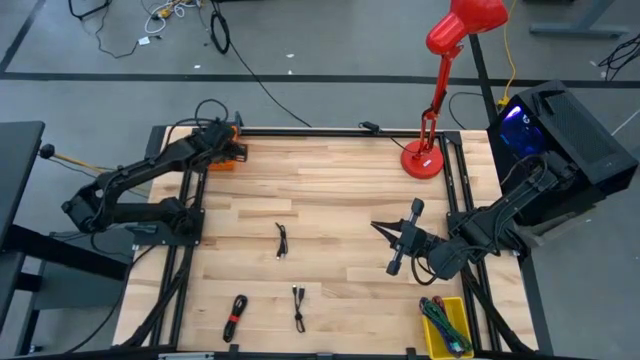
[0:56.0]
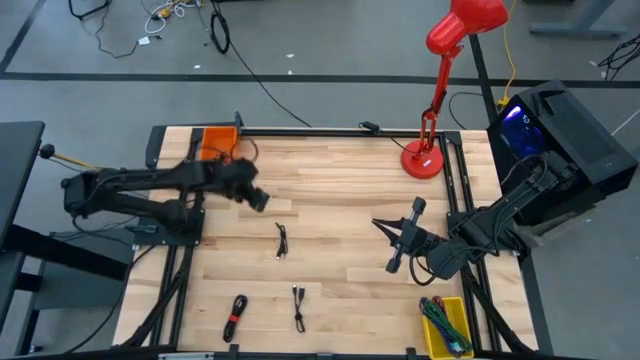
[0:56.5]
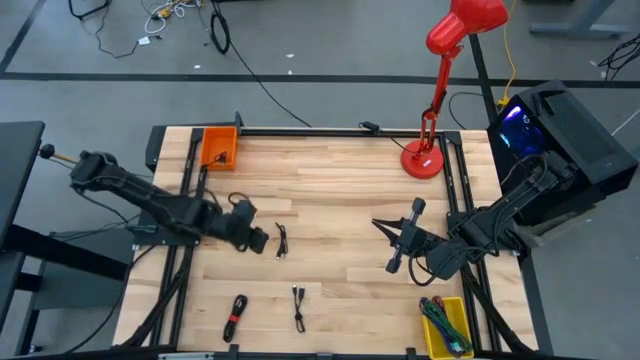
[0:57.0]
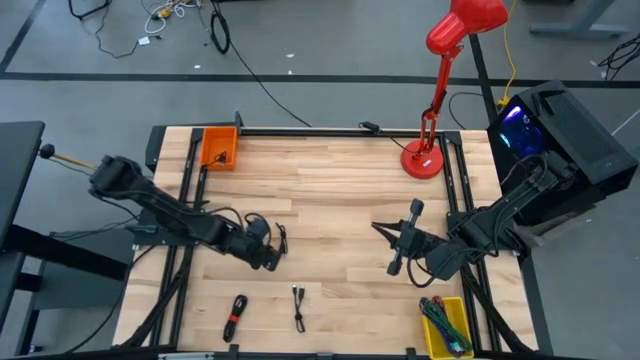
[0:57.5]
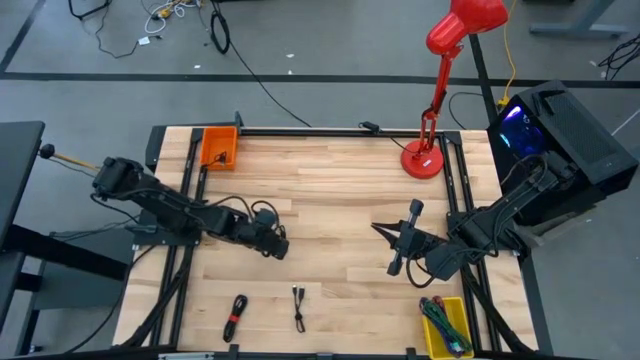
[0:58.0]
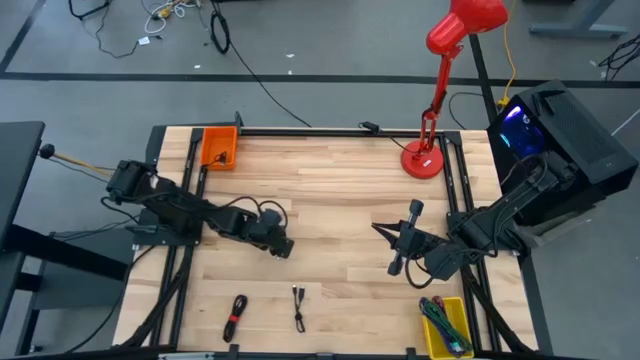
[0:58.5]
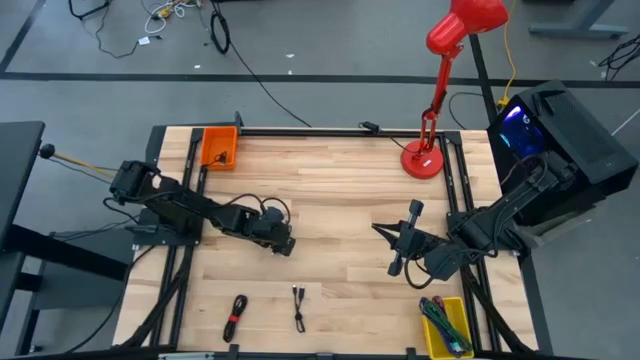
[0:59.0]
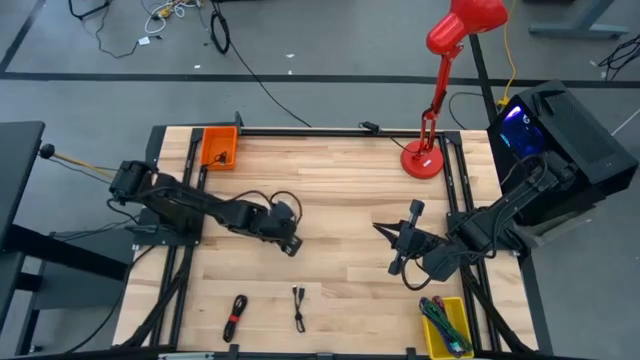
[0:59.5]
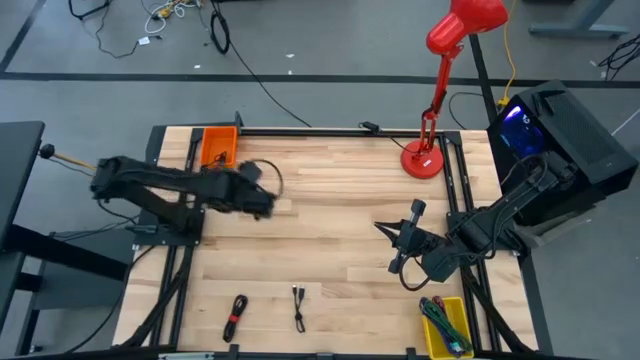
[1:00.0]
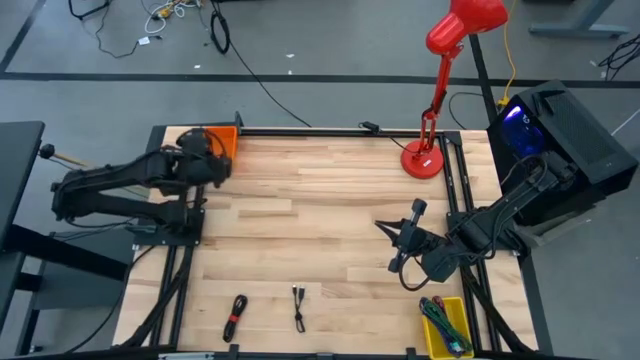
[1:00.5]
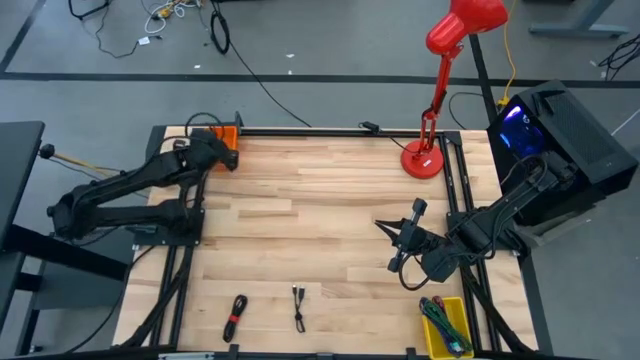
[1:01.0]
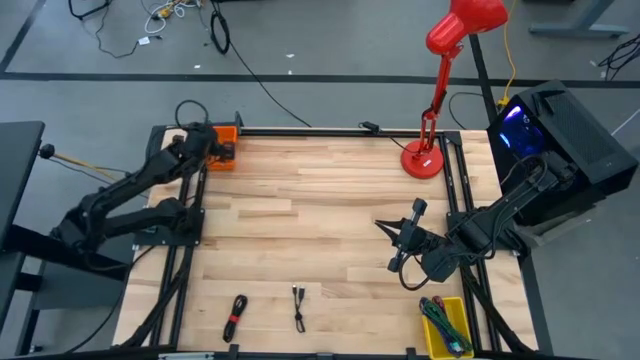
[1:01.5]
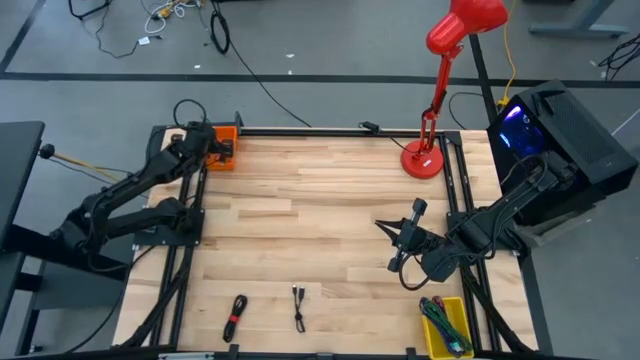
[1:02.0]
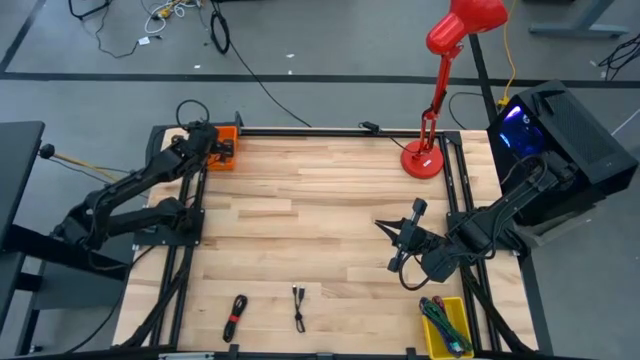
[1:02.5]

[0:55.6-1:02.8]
Task: Pick & Place USB Port
Put the top black charger cable into the orange bin

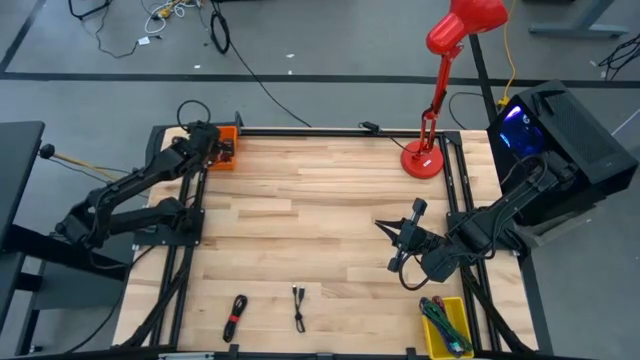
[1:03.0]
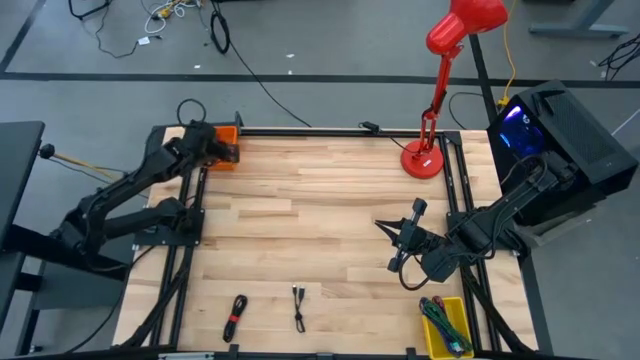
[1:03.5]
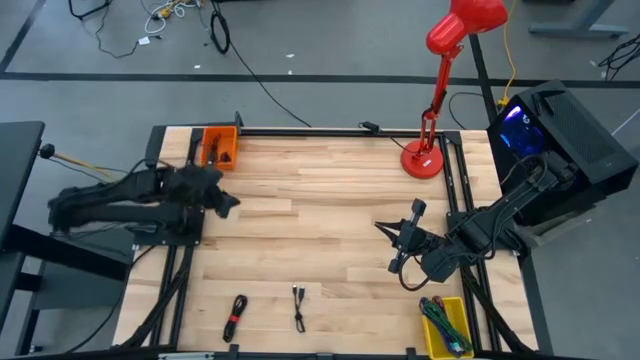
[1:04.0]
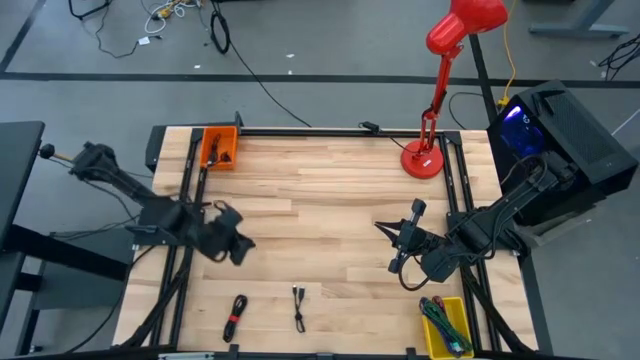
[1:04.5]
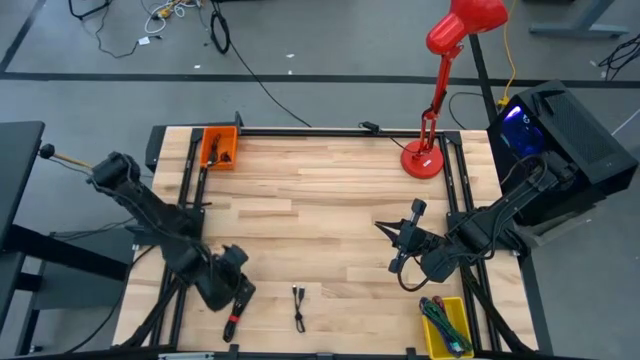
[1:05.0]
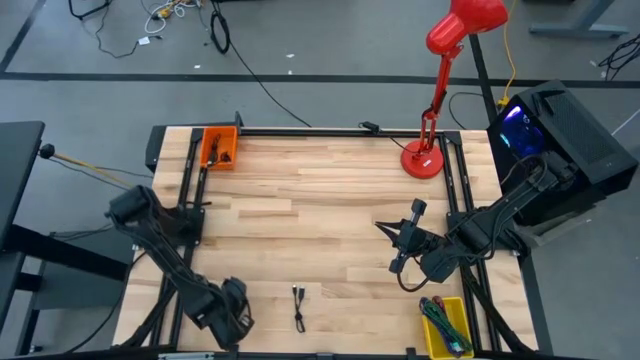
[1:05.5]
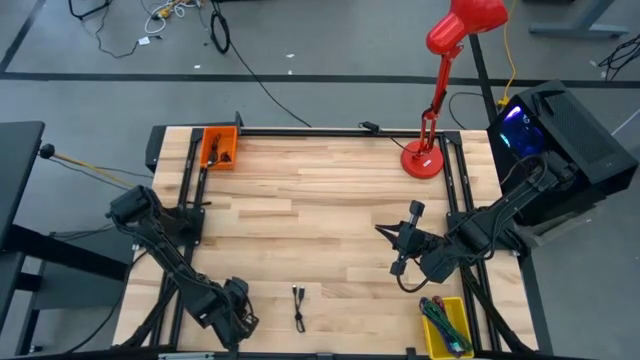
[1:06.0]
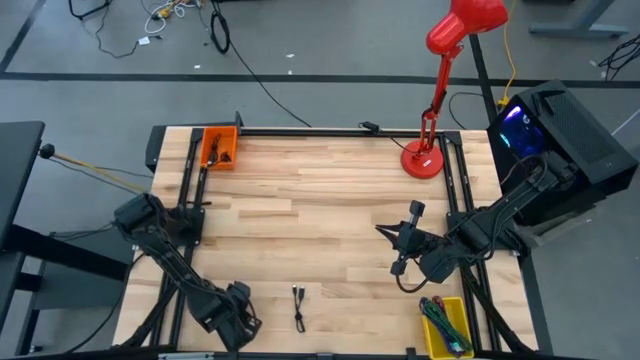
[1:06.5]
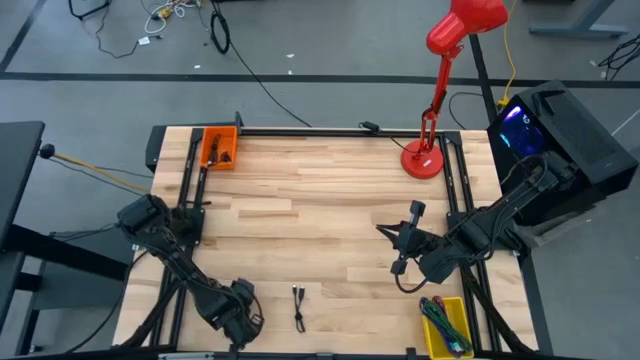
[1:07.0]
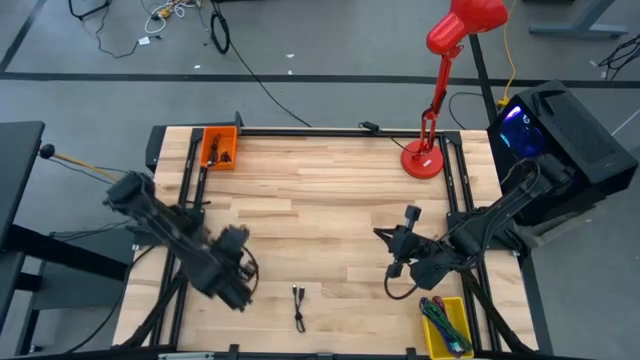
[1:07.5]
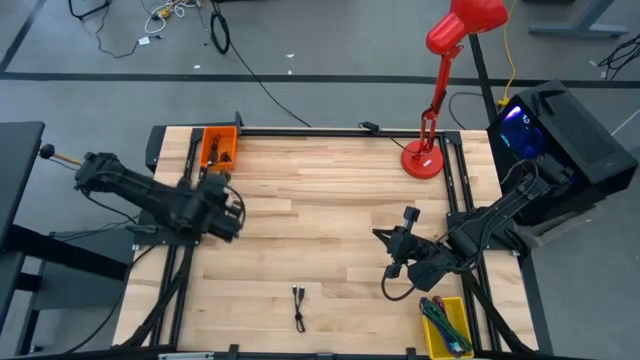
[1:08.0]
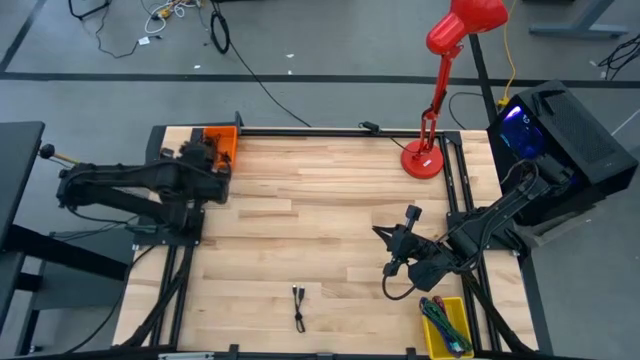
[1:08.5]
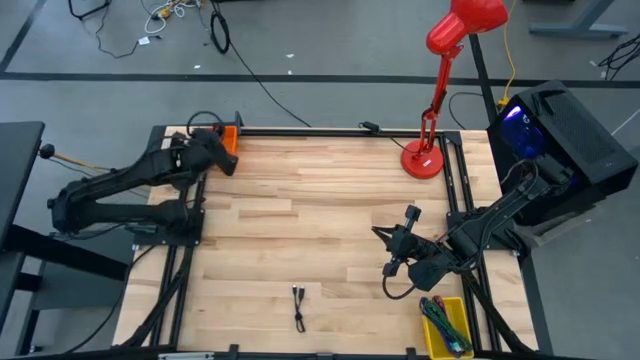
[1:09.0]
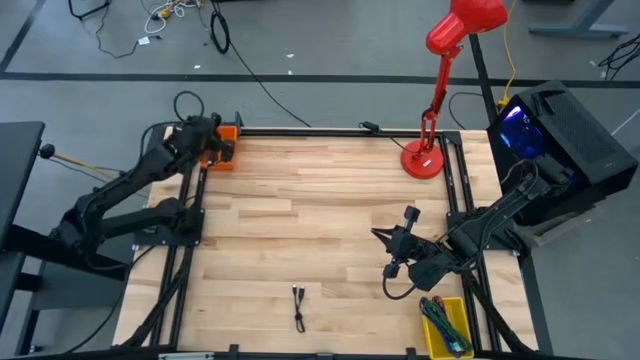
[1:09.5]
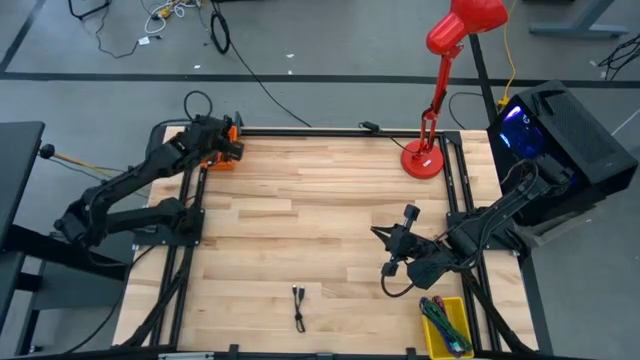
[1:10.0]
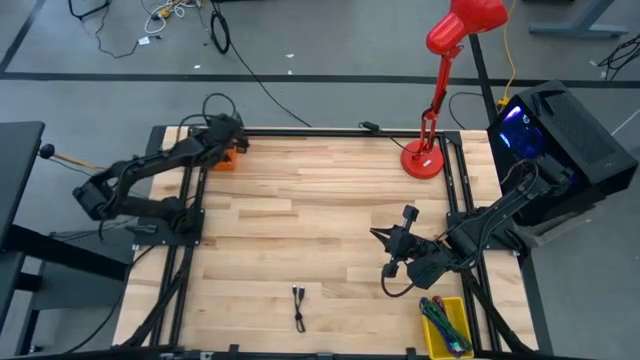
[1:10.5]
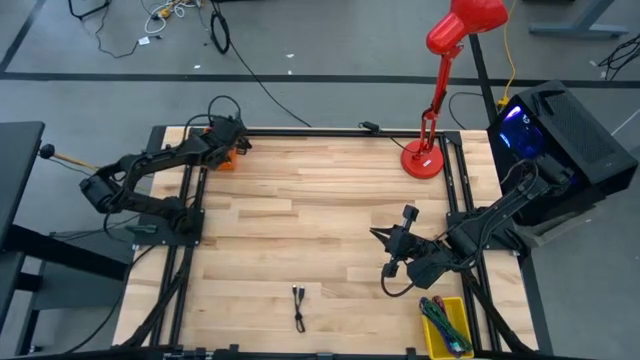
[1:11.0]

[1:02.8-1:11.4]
Put the left black charger cable into the orange bin

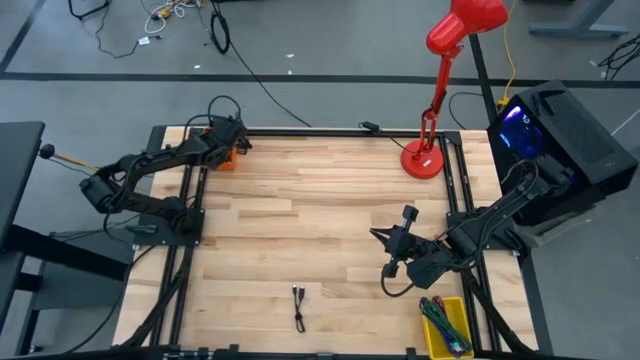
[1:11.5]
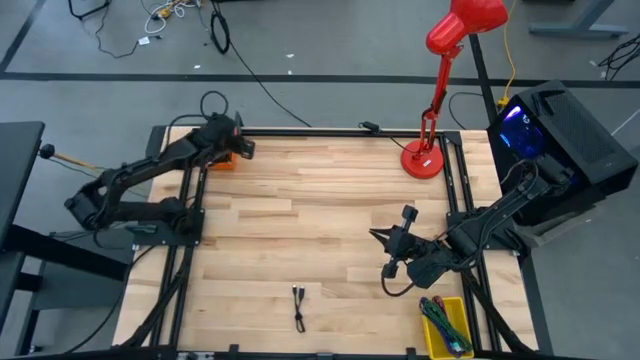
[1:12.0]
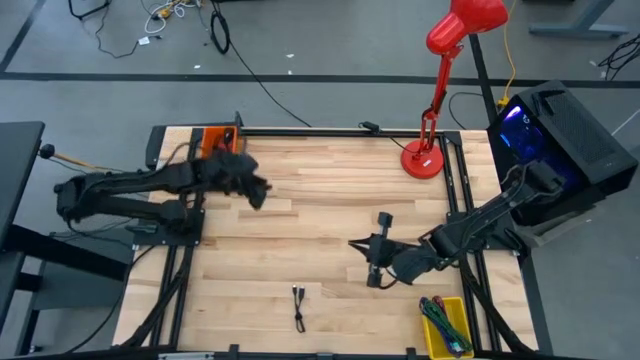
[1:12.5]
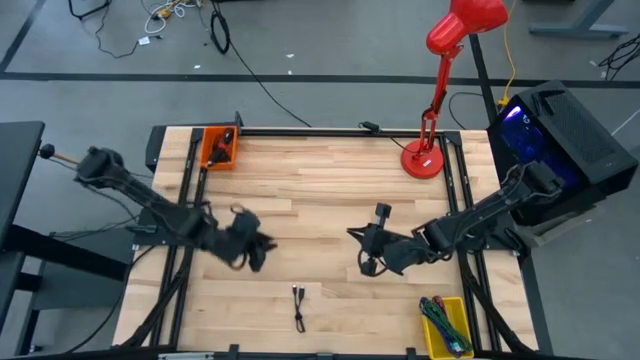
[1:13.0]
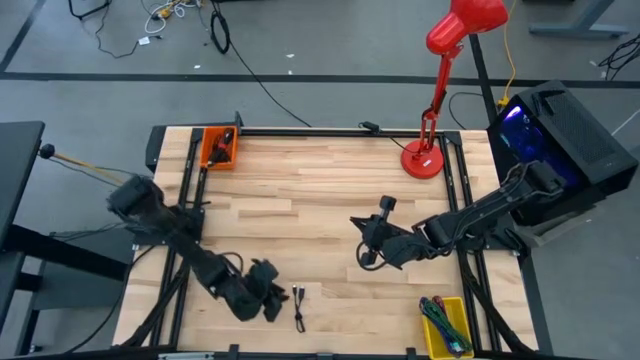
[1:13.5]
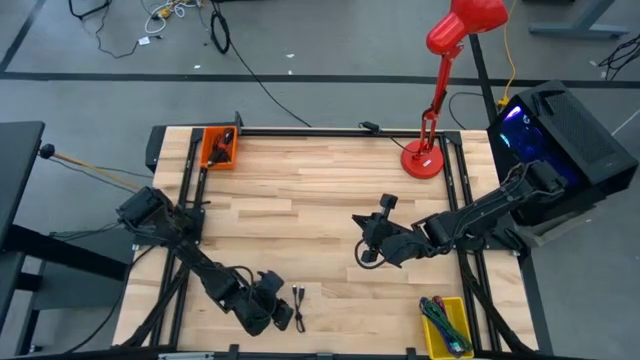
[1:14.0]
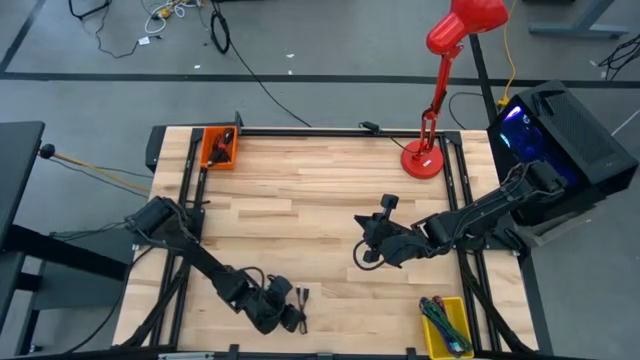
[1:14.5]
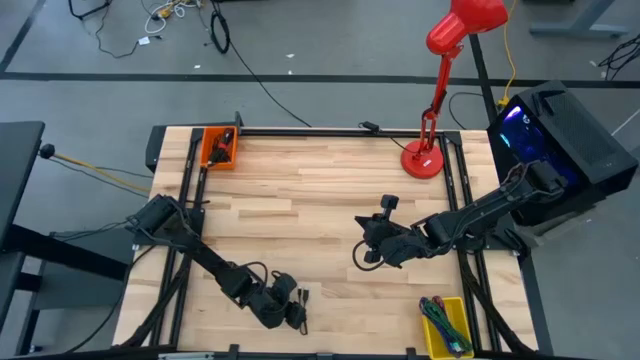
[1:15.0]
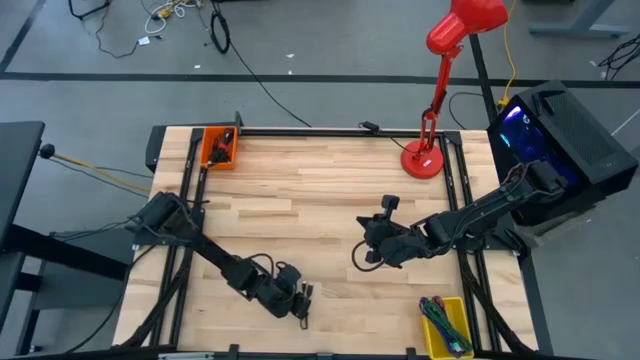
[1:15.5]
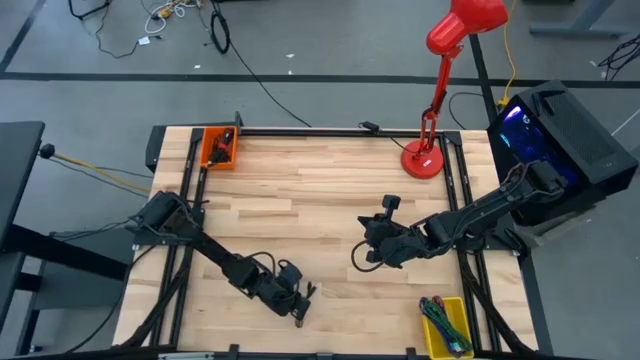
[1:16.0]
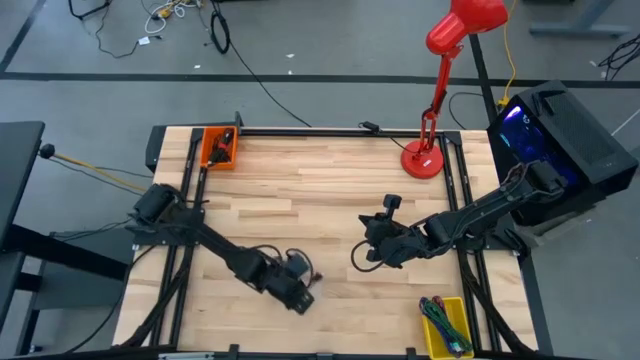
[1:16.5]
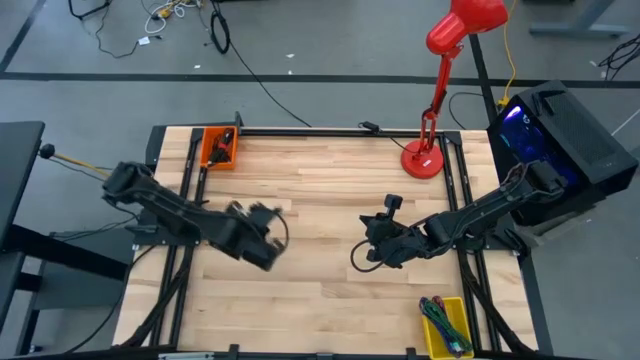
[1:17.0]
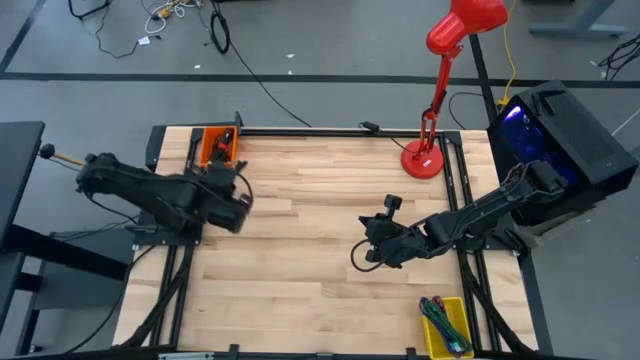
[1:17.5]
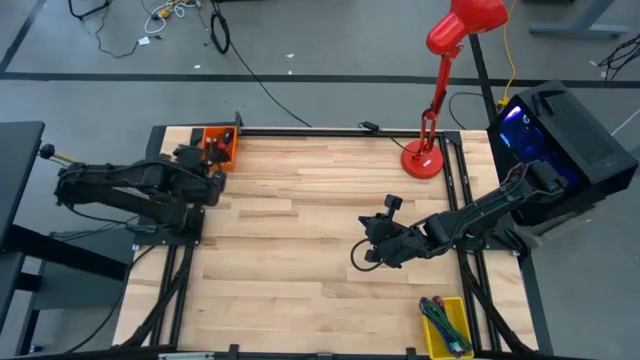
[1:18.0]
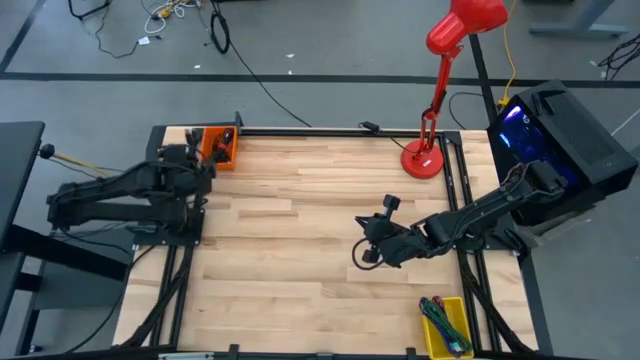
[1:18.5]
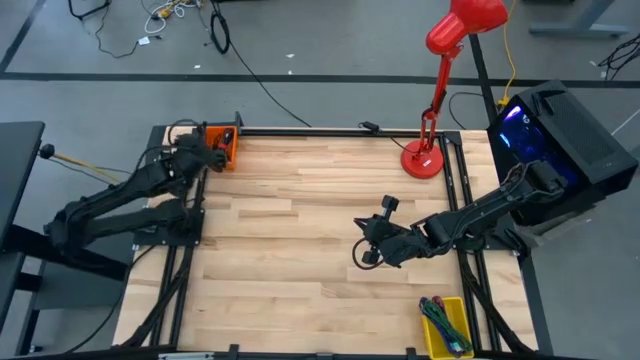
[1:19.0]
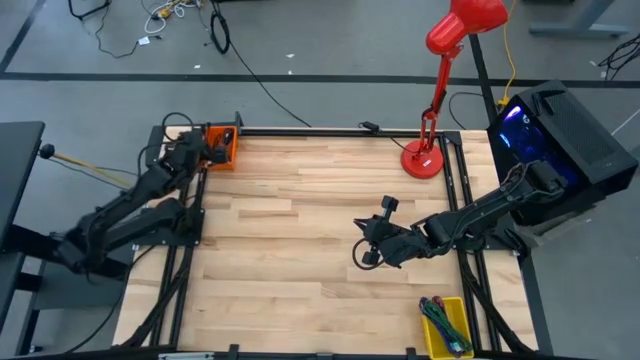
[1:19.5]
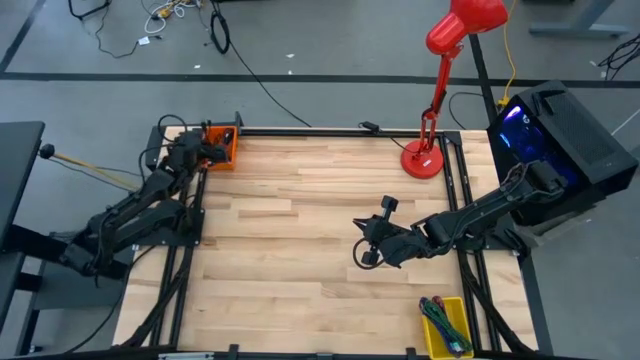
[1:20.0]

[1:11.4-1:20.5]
Put the black charger cable into the orange bin
